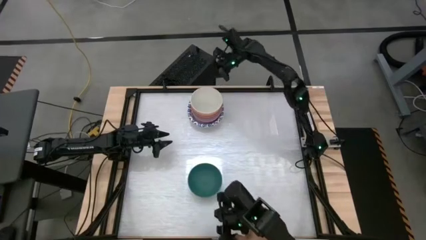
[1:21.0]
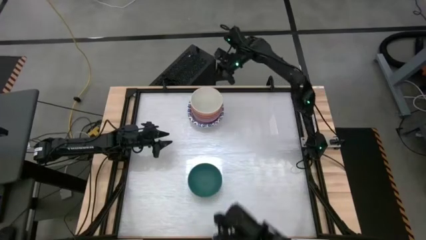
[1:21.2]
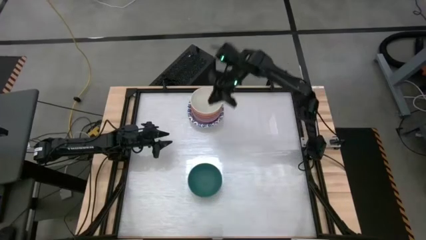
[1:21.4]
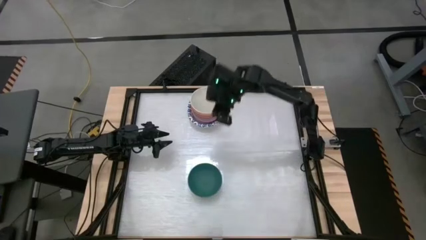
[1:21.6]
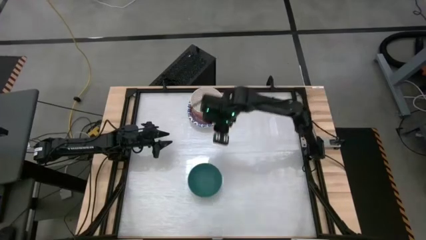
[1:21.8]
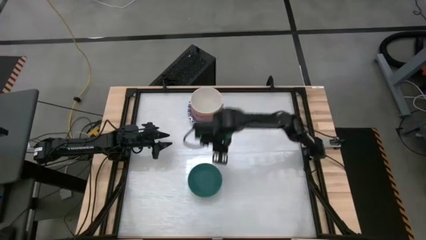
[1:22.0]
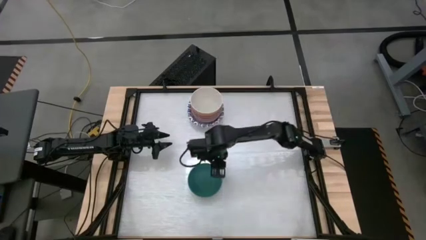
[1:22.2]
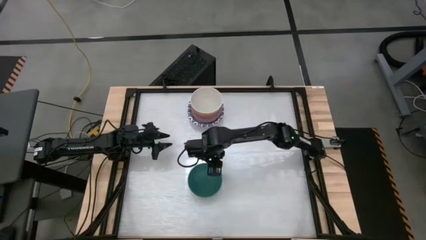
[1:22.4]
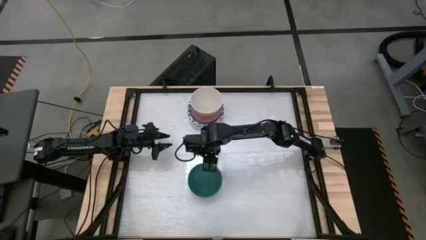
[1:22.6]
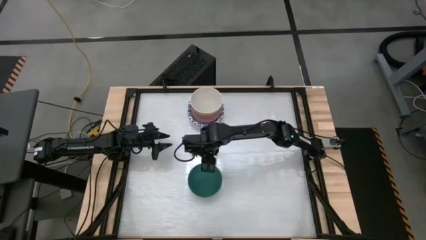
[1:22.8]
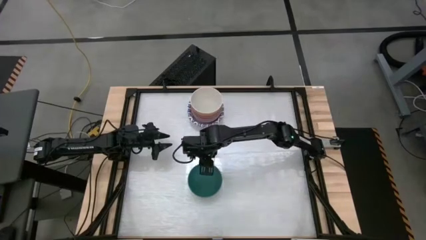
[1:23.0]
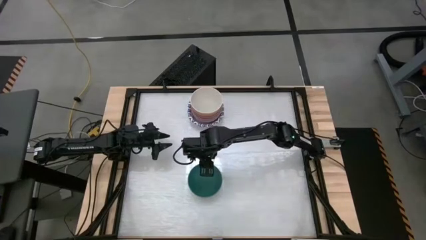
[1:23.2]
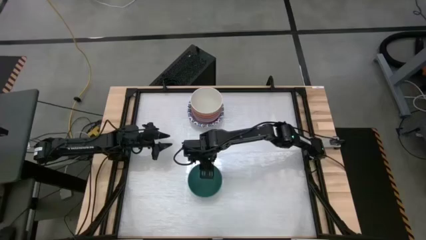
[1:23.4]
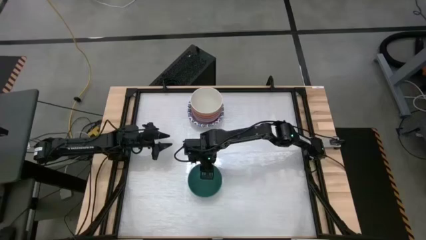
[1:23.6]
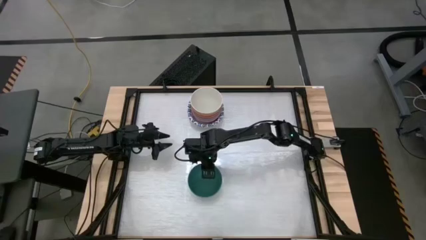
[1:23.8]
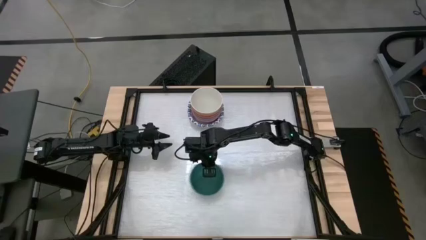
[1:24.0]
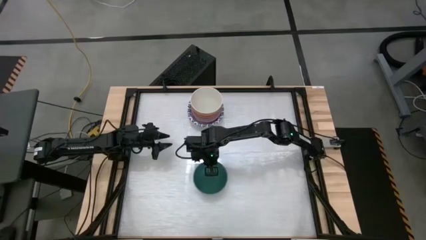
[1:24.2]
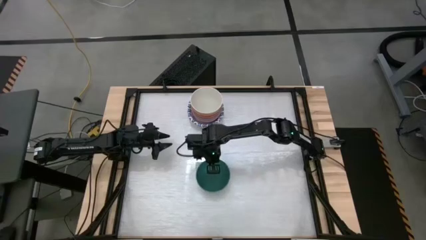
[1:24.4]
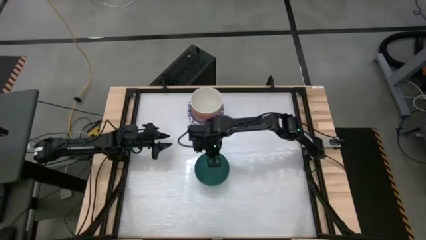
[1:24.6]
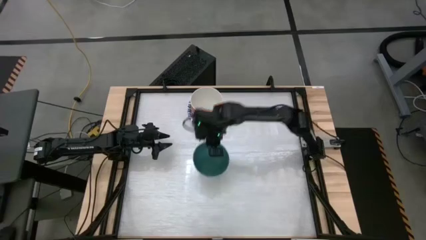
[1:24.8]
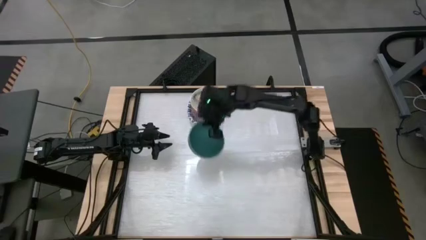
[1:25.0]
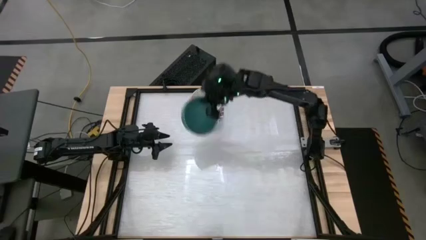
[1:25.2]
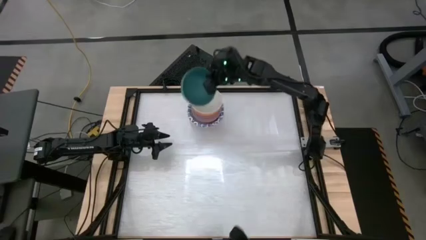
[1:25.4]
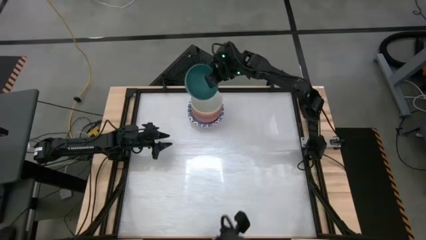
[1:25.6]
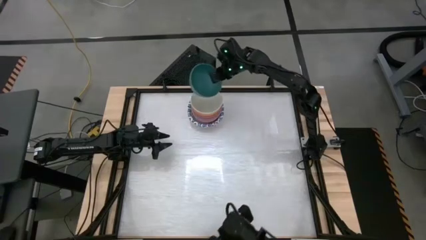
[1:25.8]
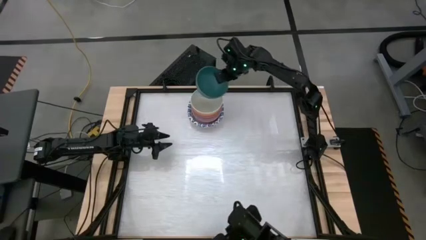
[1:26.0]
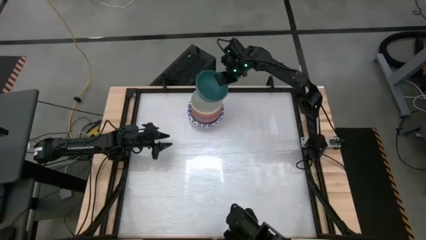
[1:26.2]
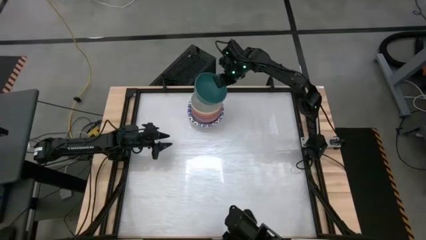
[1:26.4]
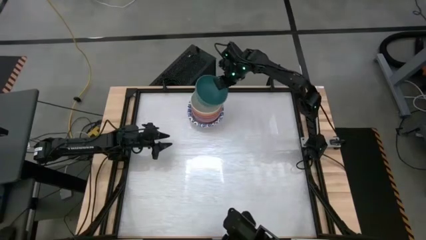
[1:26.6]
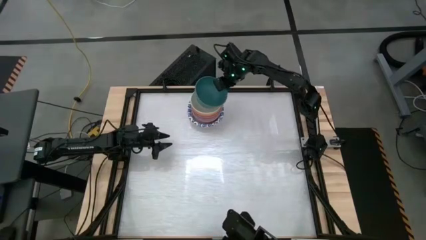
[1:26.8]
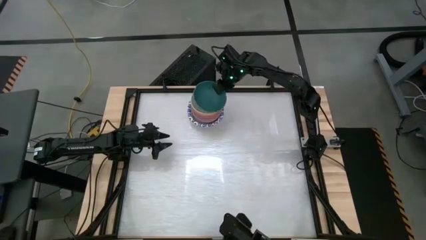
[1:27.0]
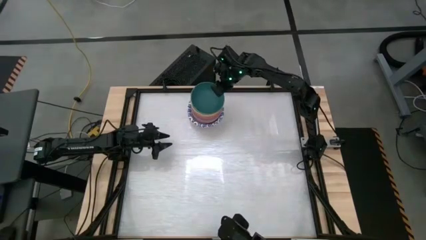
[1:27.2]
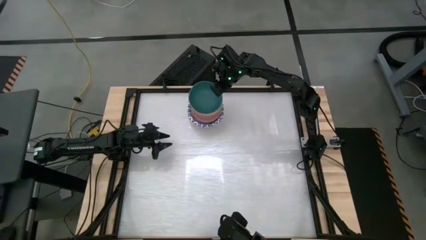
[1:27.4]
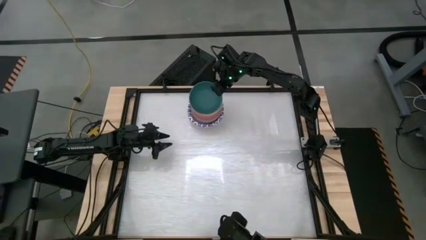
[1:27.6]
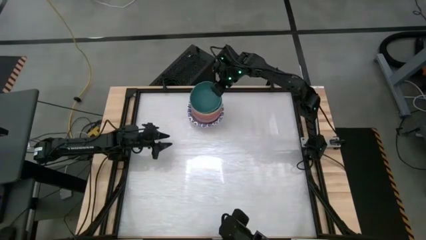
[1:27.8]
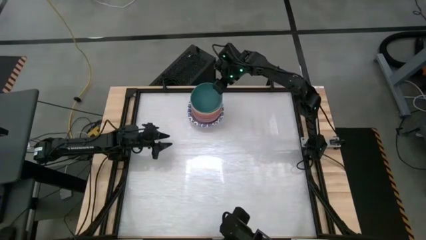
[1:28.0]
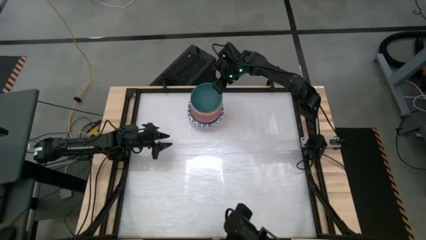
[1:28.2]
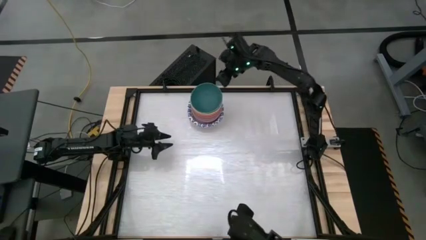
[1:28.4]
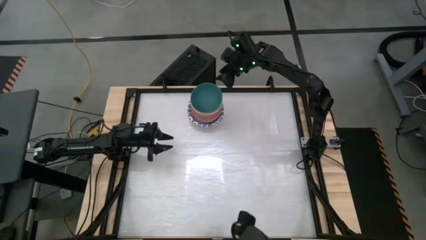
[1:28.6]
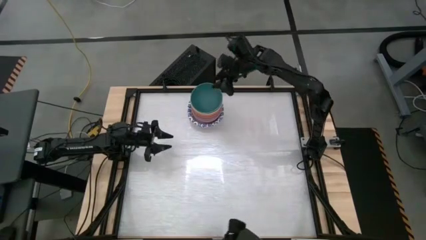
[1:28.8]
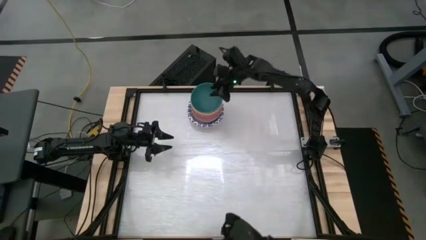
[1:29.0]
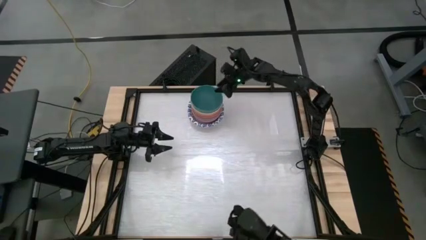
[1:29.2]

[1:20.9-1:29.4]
Stack the green bowl on top of the white bowl

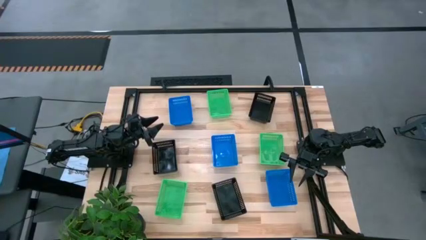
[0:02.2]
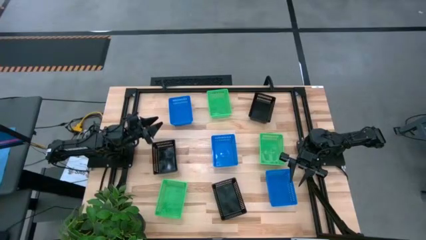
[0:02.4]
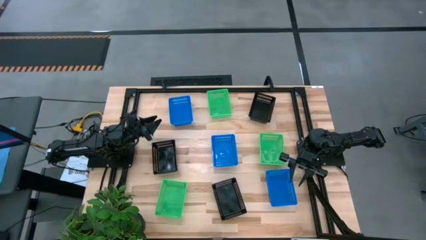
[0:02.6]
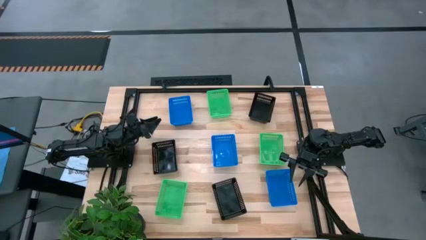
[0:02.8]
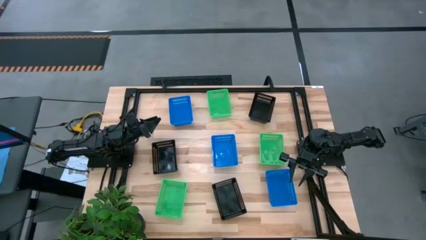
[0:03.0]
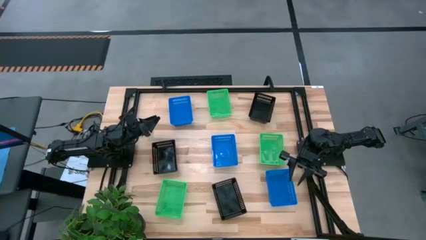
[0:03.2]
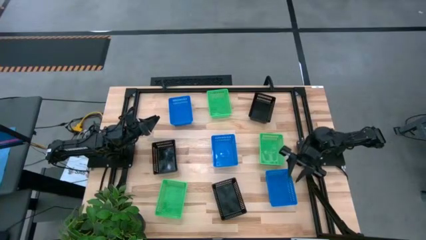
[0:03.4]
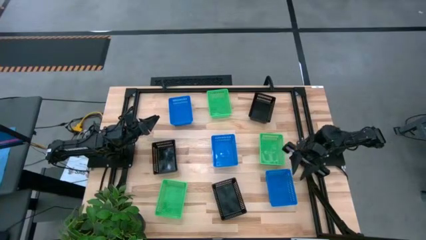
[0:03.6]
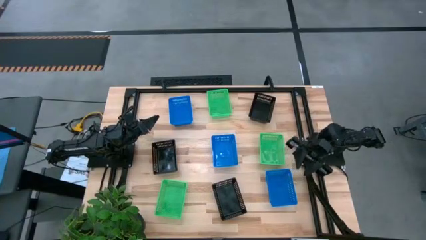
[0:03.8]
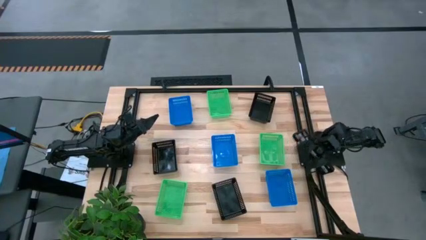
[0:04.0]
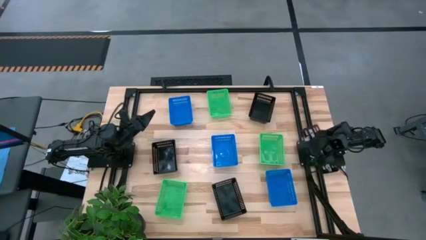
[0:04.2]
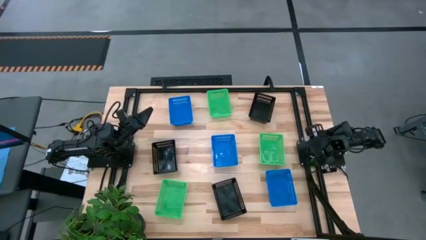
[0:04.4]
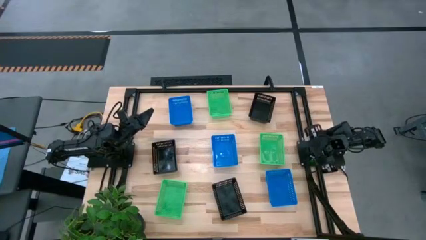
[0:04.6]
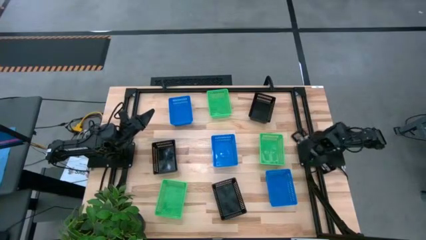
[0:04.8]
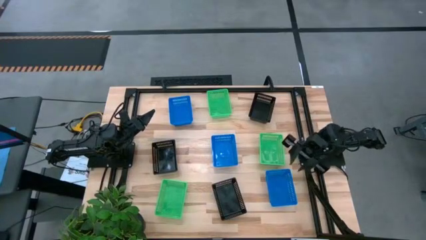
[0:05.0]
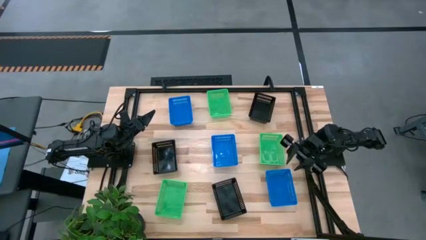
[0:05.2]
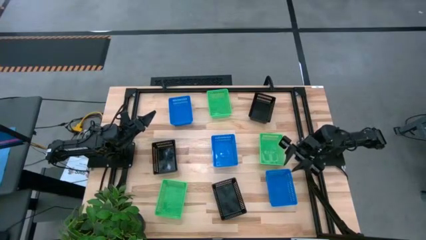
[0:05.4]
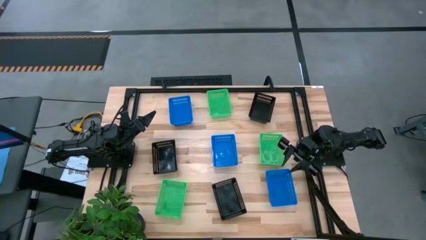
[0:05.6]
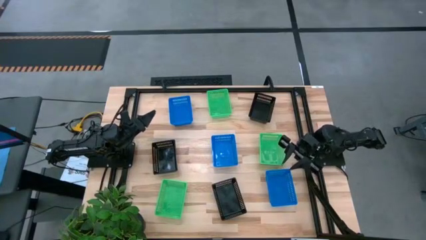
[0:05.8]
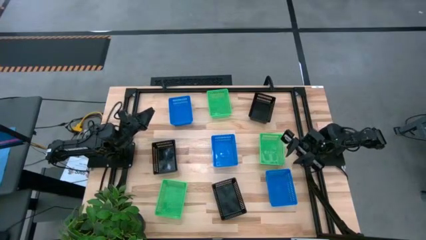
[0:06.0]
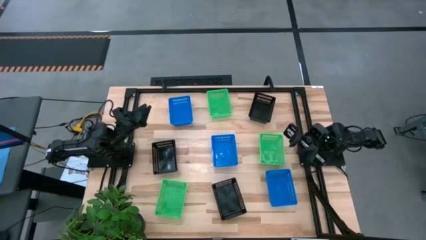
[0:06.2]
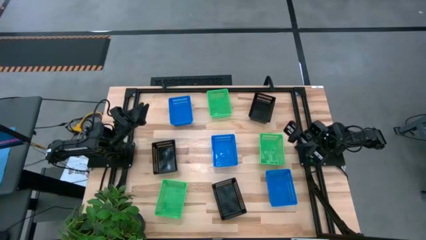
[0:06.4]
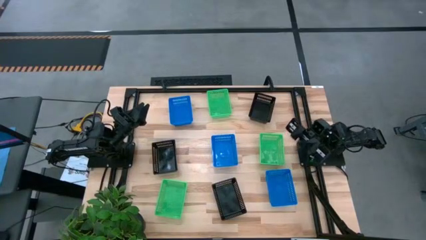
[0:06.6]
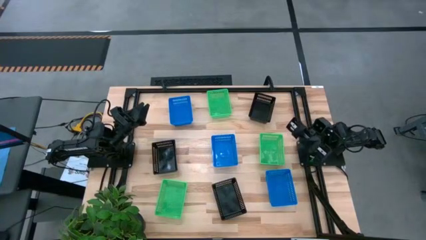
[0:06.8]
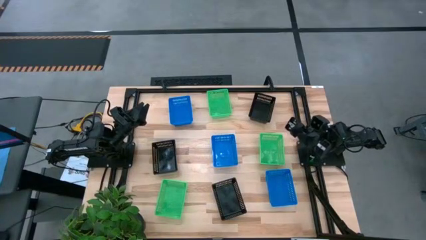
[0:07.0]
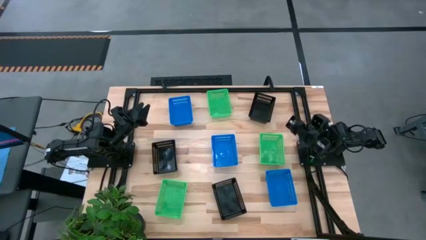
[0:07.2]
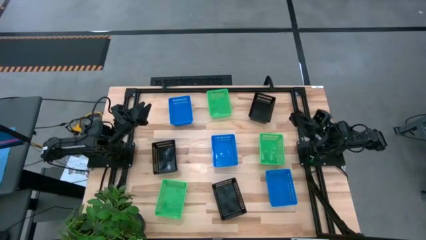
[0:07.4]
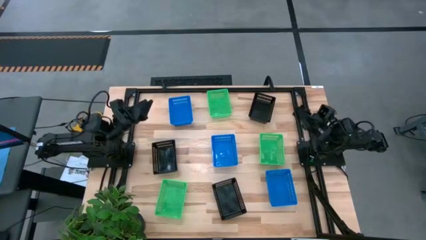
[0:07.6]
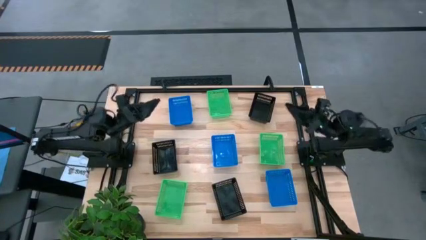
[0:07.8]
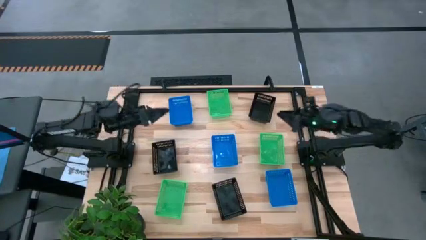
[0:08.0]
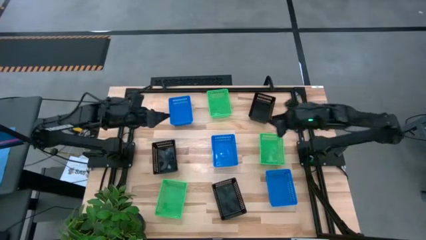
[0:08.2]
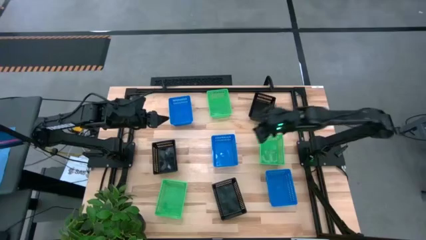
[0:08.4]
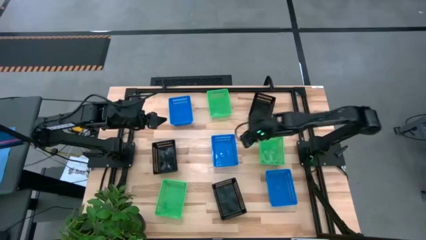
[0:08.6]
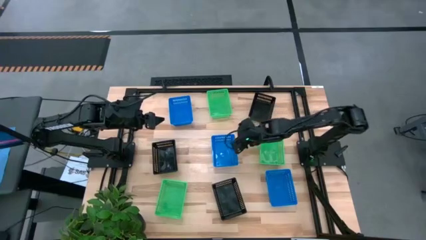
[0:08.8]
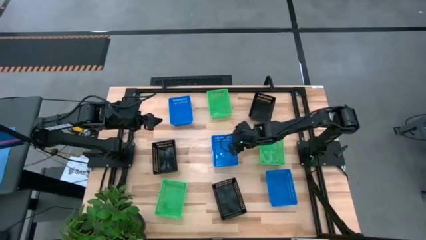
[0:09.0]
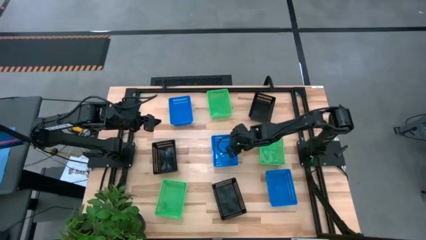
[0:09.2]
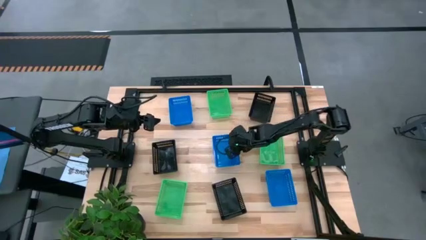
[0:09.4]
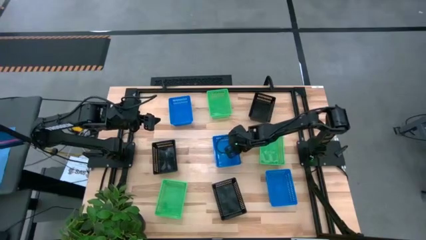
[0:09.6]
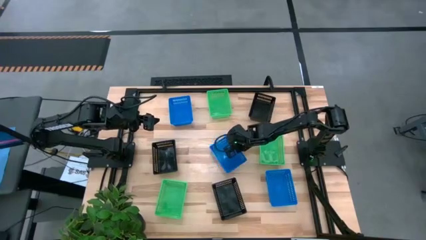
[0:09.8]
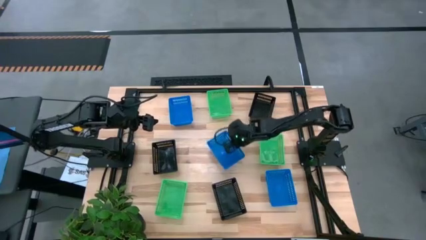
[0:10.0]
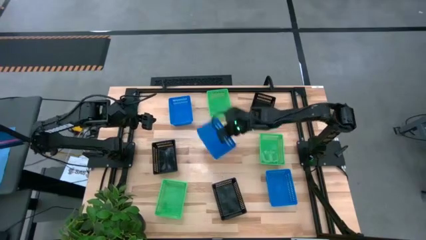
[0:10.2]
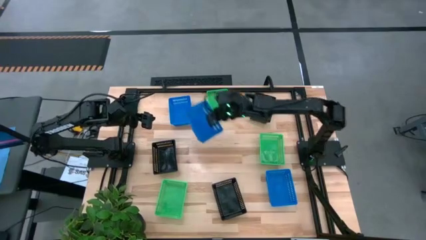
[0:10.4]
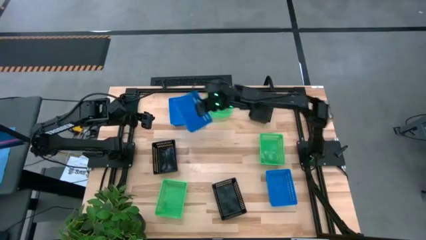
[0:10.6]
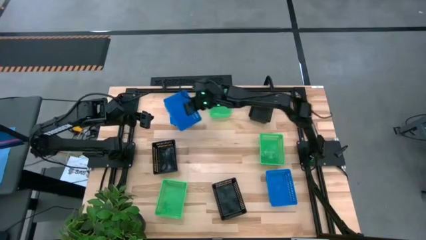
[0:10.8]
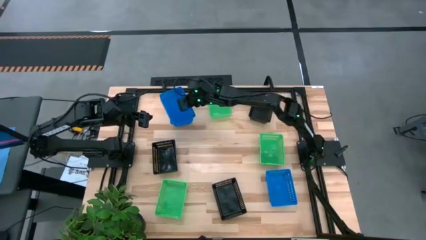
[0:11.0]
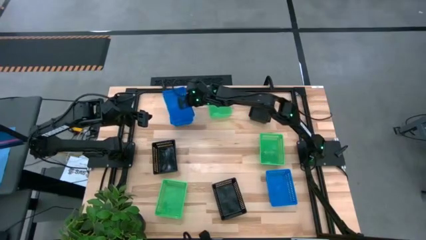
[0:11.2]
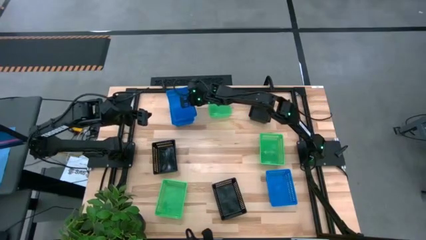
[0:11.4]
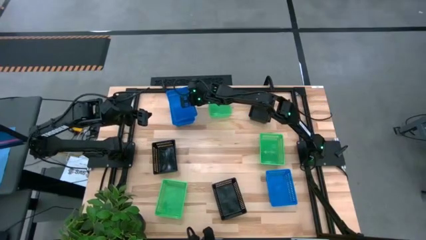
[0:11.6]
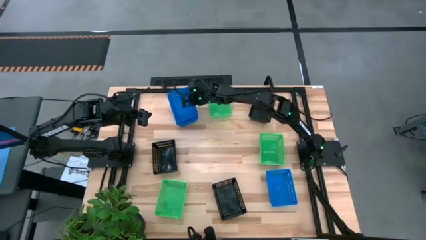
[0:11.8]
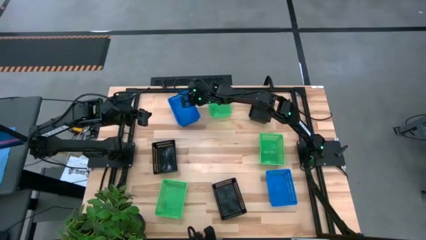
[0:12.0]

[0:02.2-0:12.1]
Stack the middle blue bin on the top blue bin
